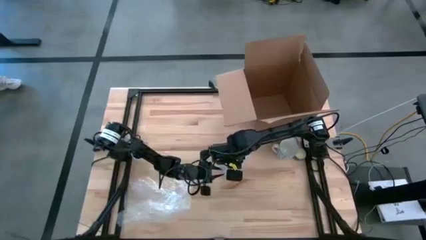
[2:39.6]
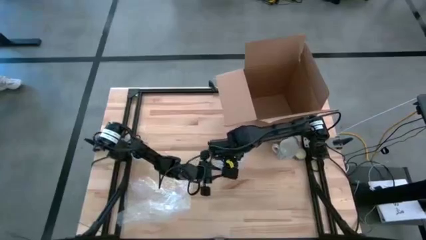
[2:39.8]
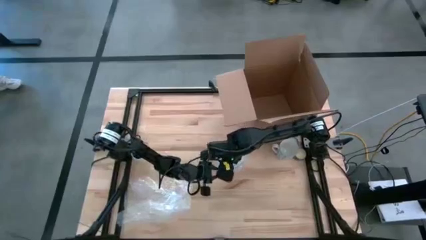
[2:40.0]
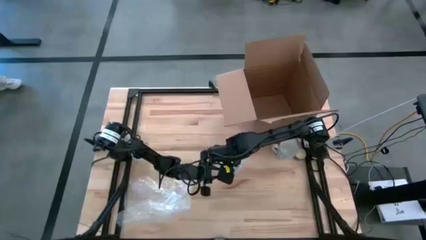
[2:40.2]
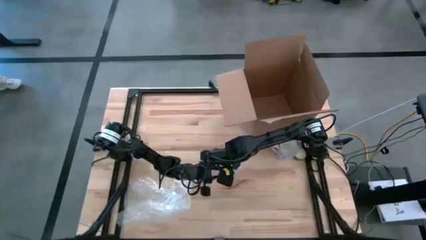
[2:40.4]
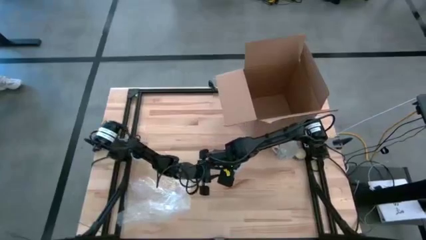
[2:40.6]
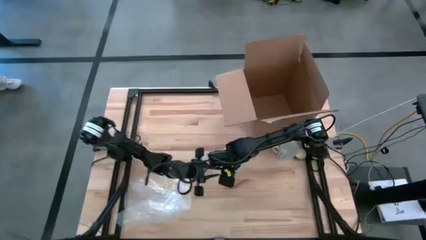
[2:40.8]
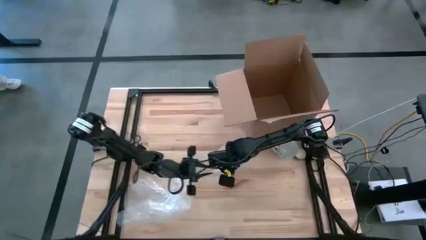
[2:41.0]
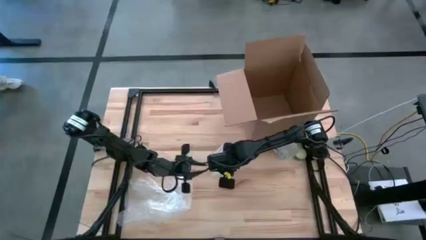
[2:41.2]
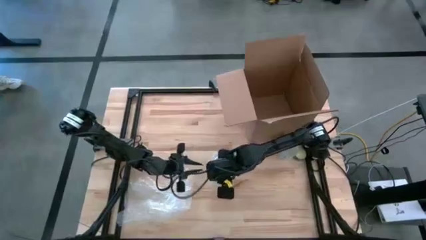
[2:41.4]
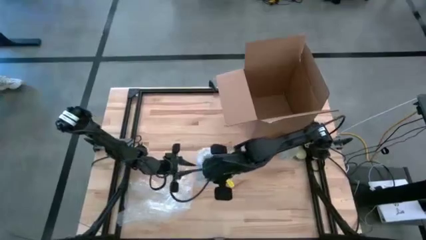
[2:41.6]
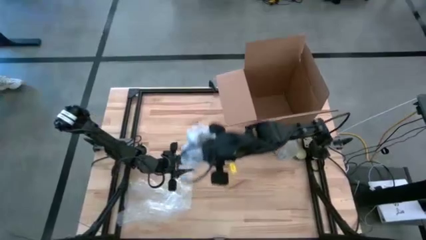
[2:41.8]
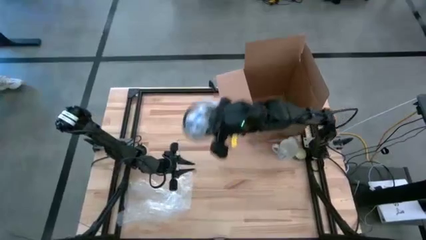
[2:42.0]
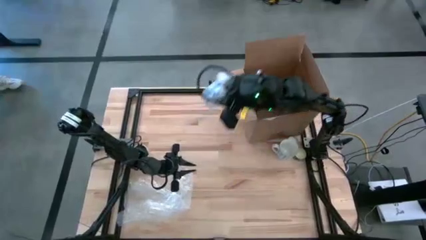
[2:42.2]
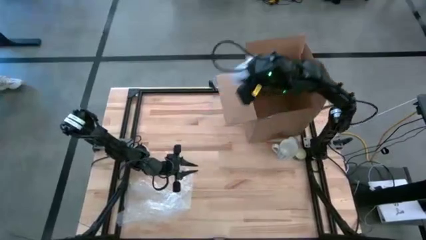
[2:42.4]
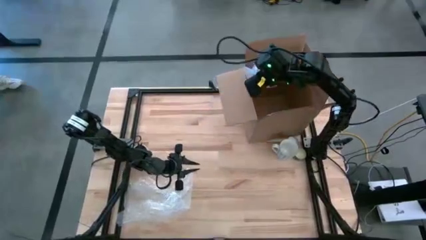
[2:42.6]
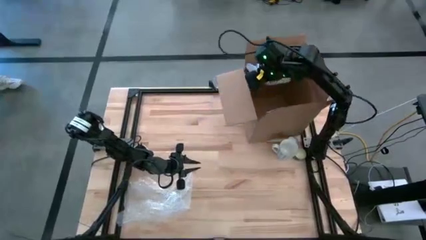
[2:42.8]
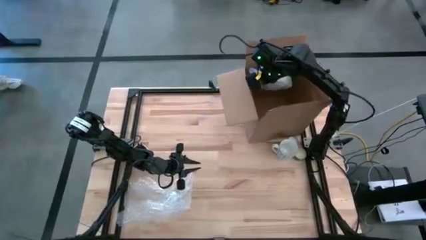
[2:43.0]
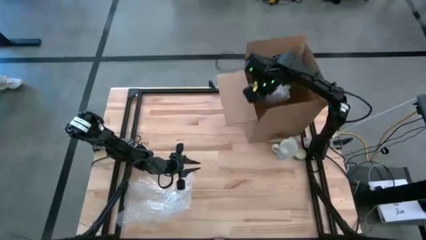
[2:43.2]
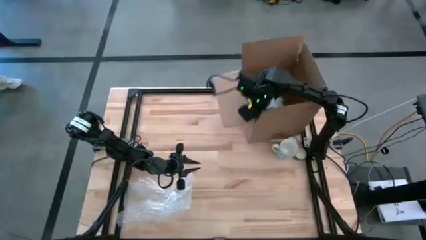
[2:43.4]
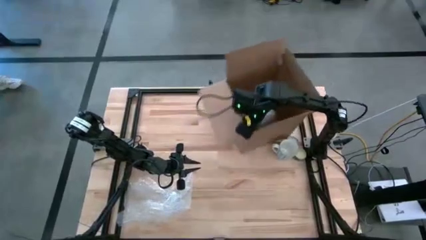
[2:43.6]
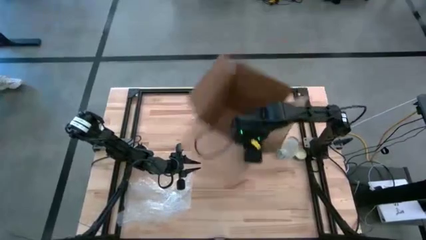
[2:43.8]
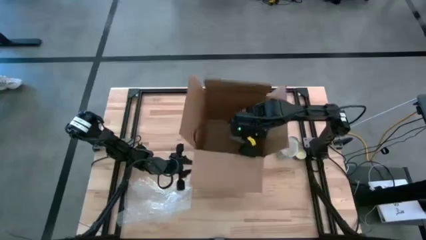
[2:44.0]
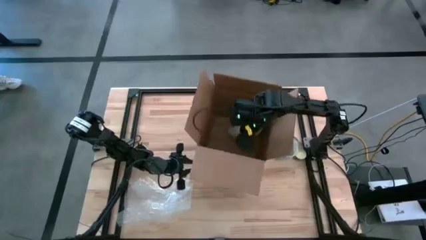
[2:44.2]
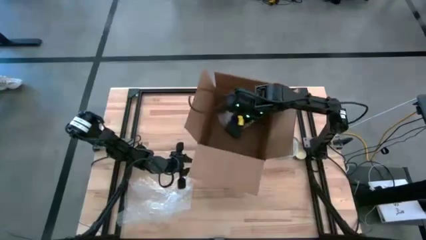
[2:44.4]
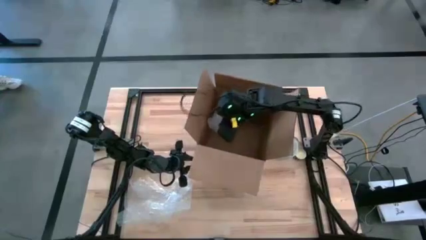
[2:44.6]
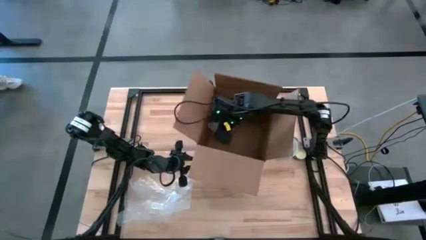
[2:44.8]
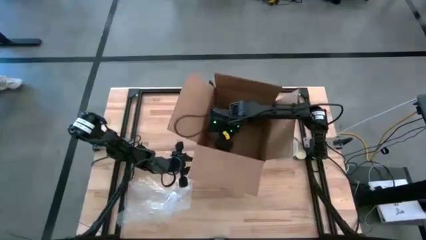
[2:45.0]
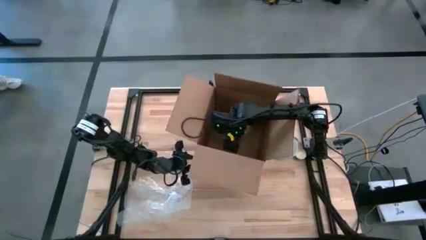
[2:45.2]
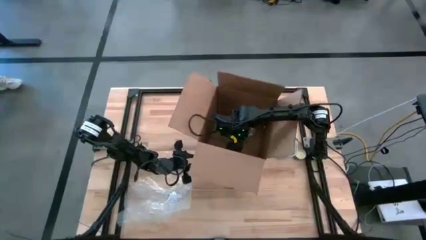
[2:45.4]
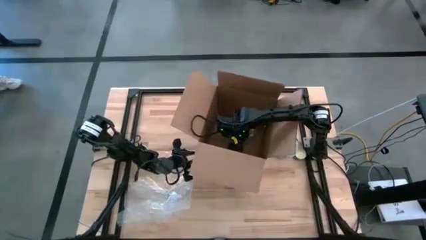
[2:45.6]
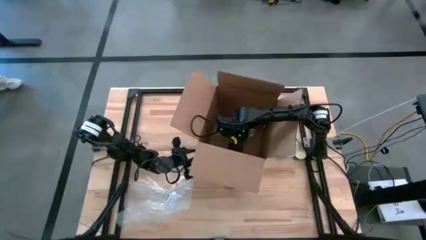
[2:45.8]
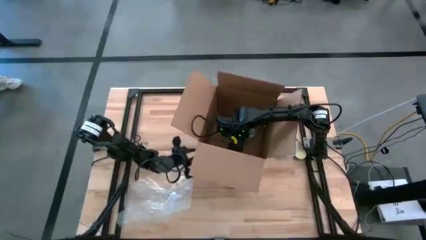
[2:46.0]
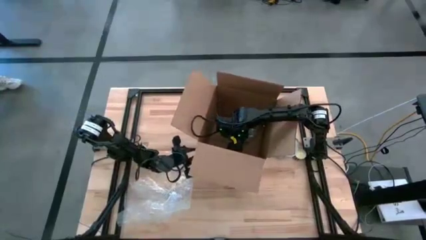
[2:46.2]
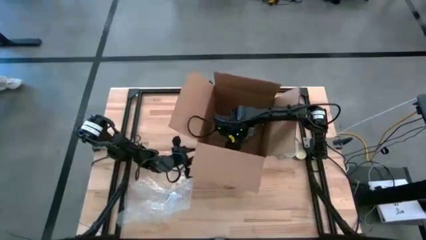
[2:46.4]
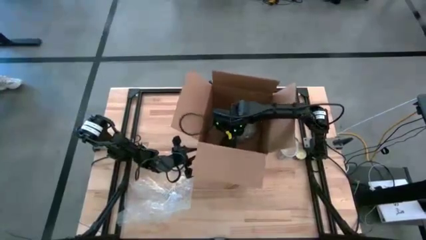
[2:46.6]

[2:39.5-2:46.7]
Task: wrap mug
Put the wrapped blue mug into the cardboard box

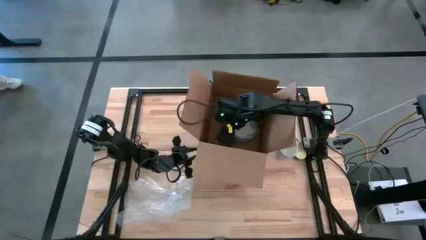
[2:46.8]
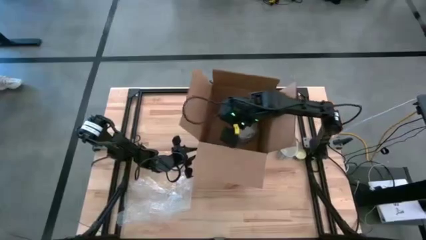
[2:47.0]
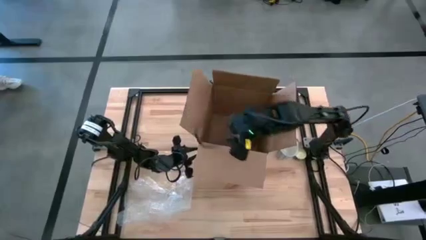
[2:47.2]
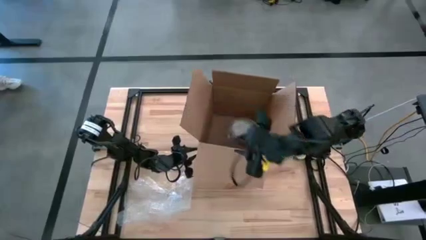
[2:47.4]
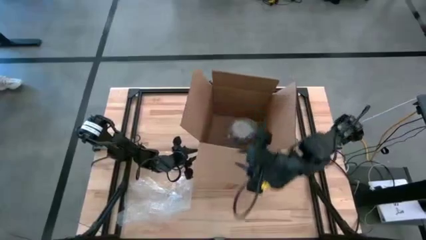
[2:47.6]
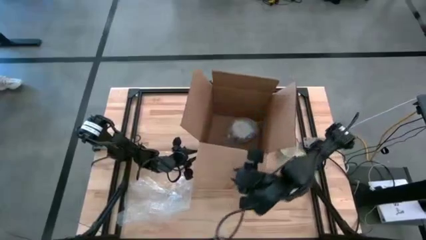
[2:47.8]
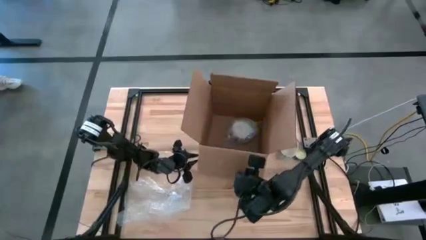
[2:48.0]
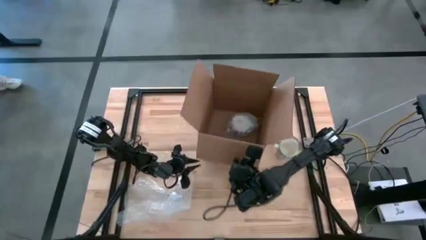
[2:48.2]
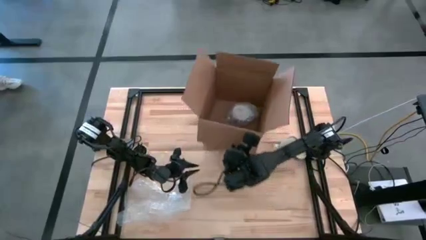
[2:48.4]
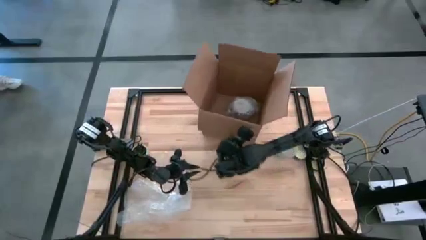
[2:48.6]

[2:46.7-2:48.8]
Move the cardboard box to the top center of the table

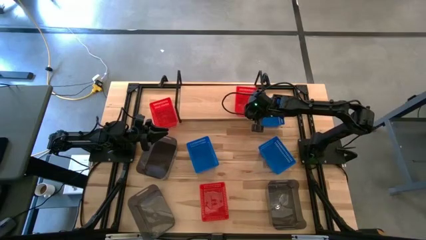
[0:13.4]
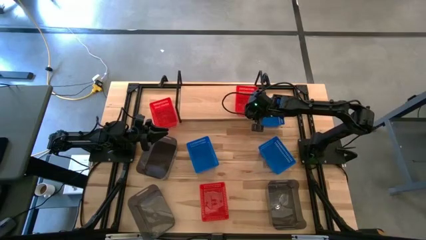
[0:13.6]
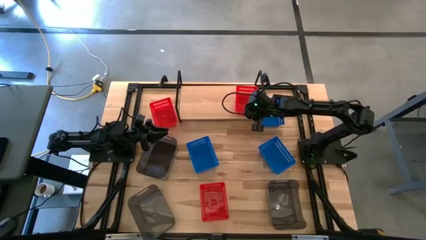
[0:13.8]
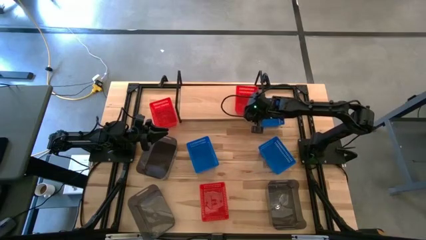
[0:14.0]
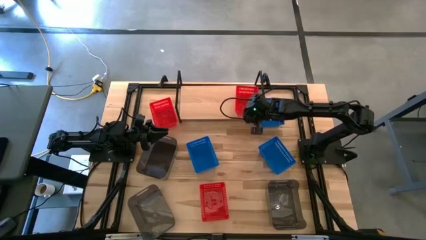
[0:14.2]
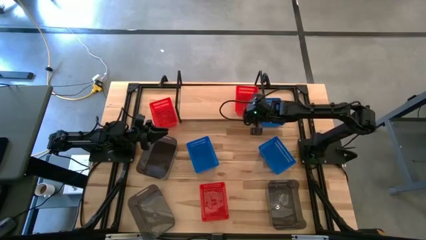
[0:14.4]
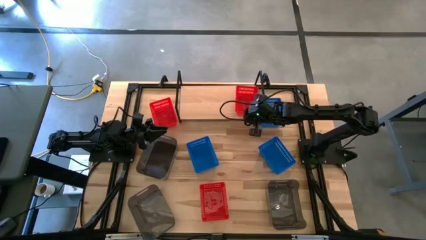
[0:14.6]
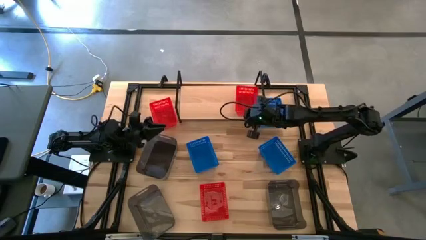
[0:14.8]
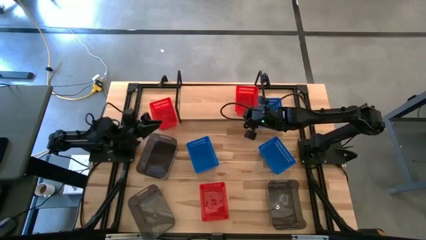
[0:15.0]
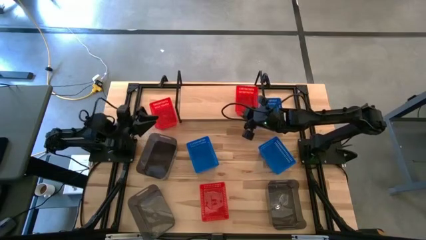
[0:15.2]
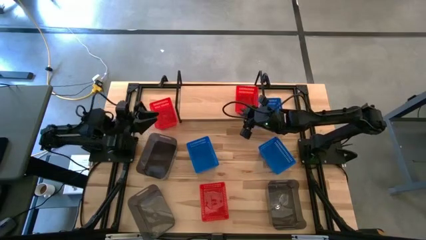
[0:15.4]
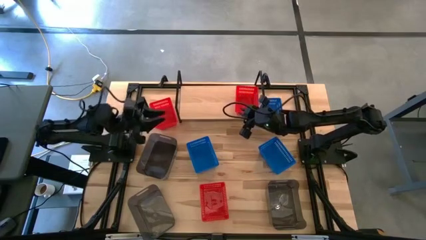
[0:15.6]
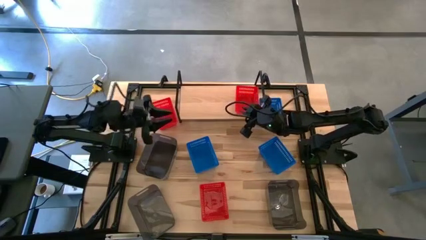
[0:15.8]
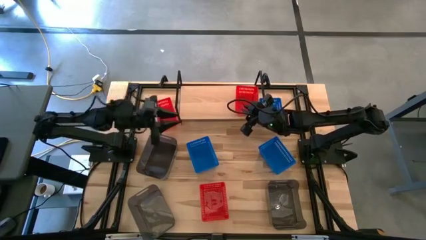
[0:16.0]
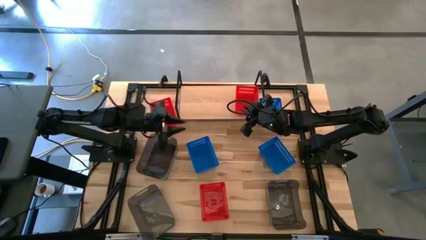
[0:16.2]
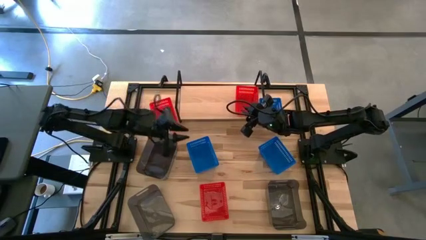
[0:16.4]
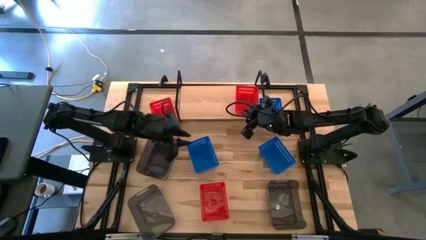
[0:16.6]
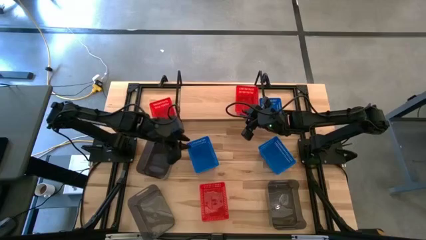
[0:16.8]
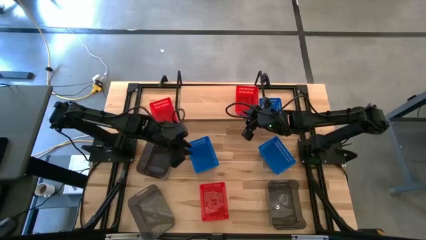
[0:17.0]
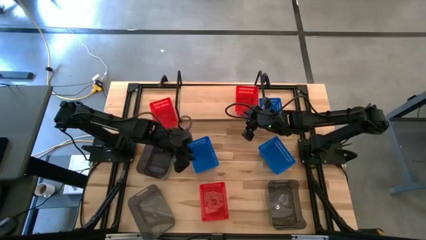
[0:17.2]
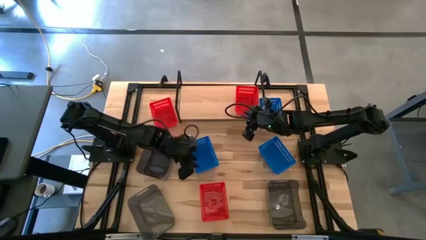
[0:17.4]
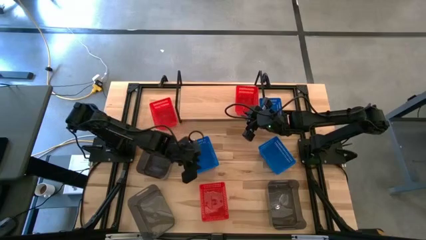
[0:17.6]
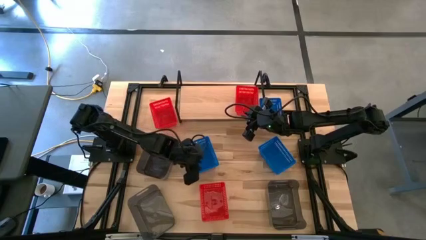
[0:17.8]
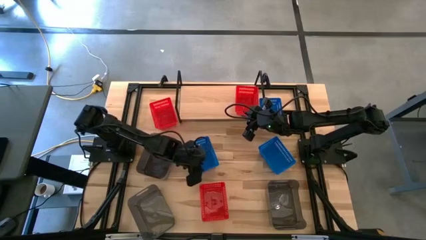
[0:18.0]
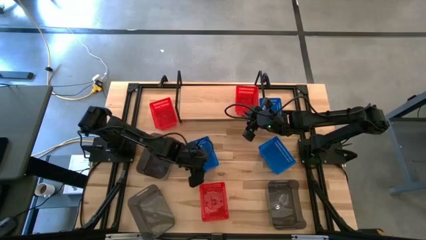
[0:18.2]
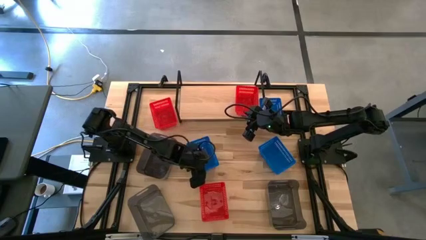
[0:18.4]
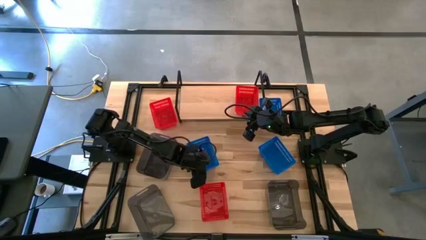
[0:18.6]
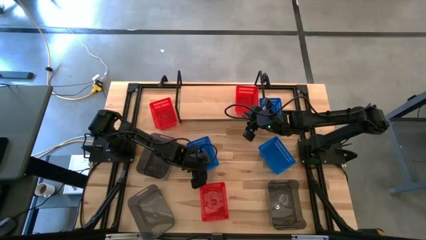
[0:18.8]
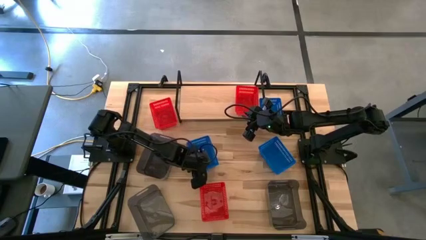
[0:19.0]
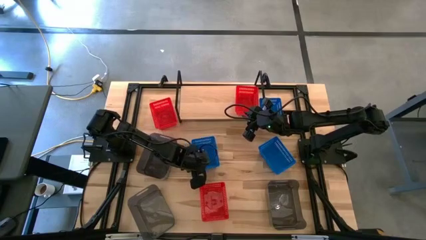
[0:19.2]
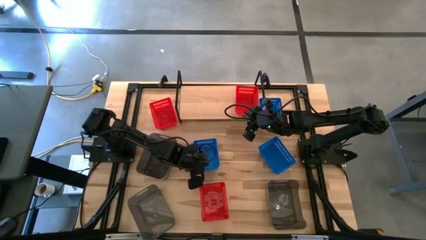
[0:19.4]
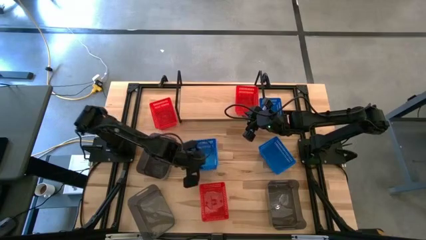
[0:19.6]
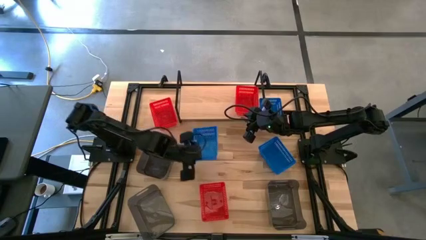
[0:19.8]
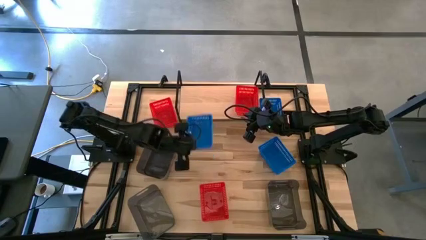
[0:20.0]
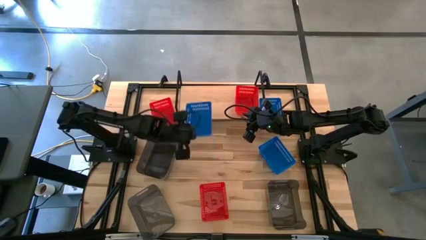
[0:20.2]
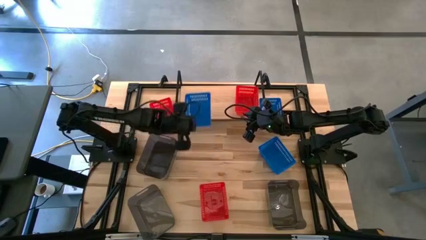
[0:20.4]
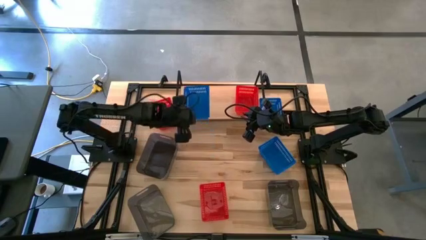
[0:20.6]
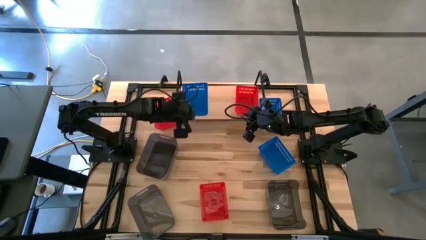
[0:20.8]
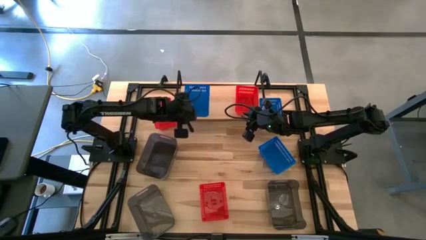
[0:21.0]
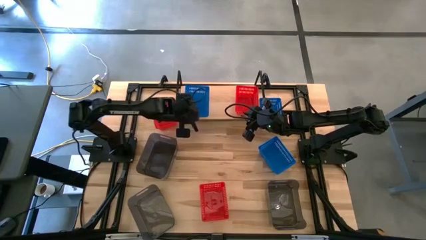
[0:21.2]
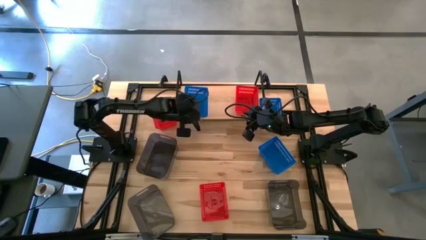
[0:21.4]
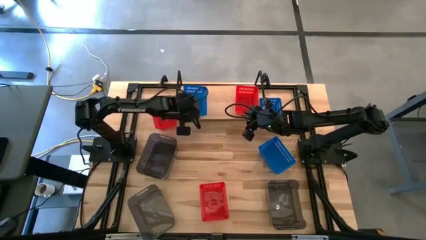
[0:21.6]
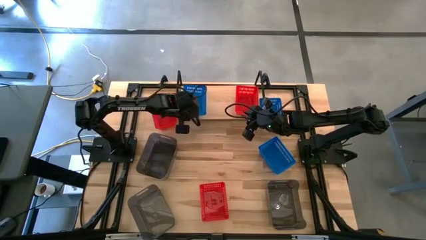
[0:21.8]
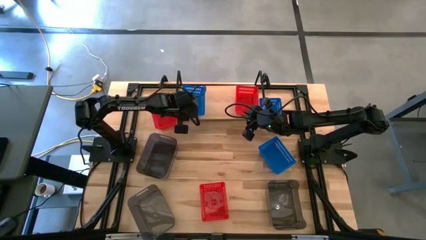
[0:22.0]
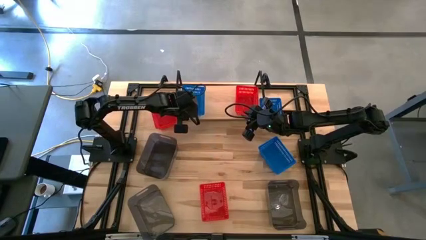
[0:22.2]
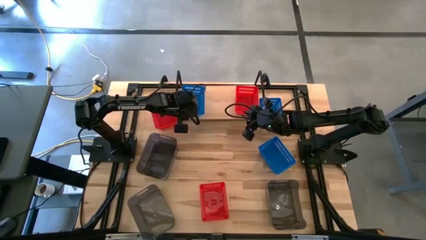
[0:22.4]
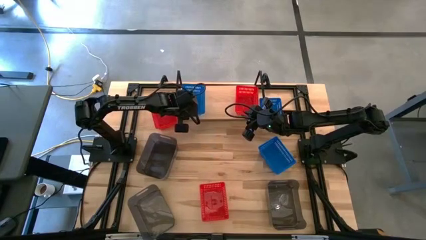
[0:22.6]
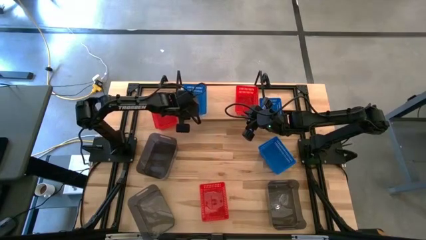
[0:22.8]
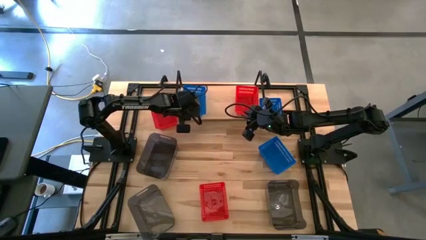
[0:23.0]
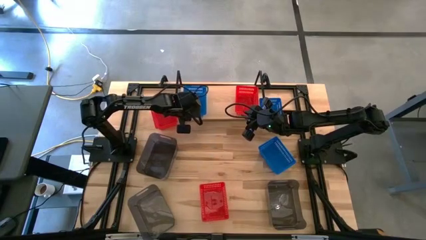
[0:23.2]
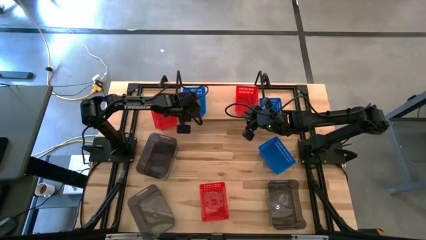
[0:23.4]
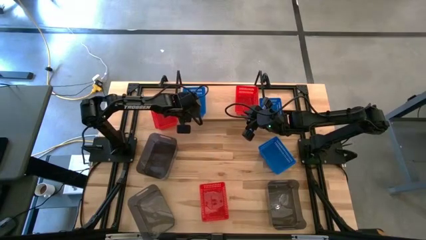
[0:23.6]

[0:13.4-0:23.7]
Task: Stack baskets on shelf by color
Put the bottom left blue bin on the shelf
